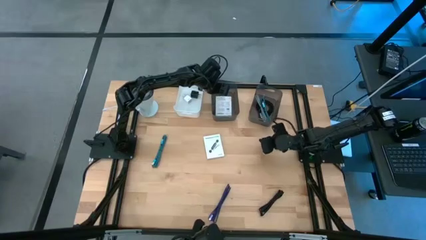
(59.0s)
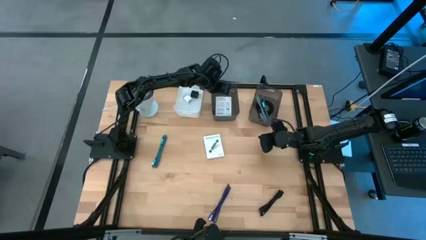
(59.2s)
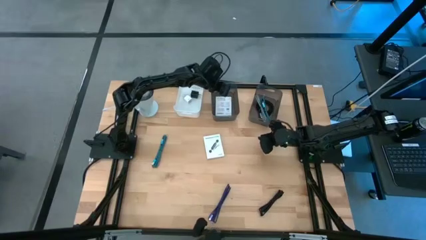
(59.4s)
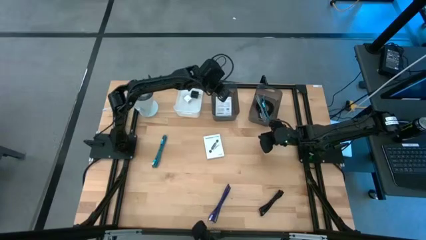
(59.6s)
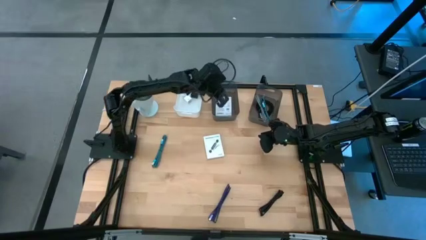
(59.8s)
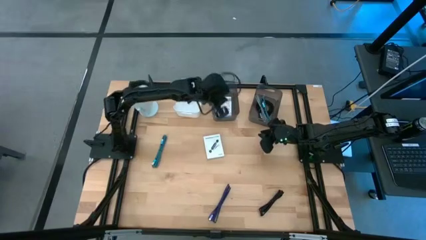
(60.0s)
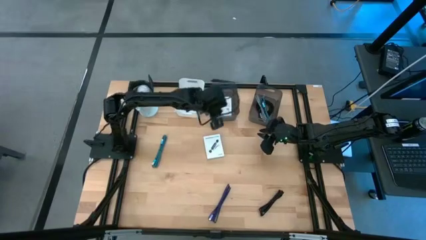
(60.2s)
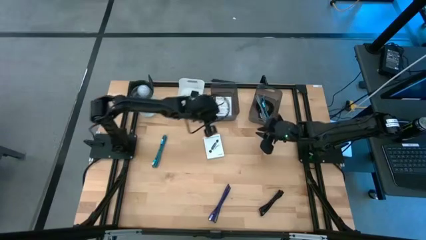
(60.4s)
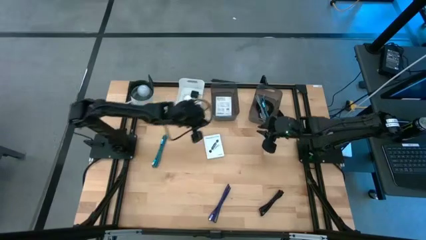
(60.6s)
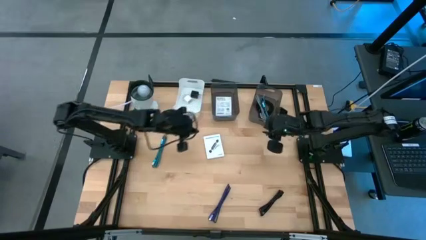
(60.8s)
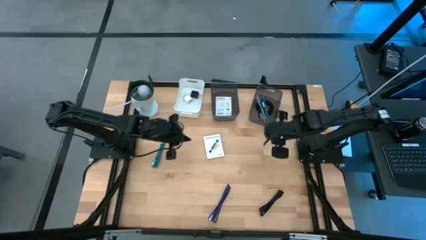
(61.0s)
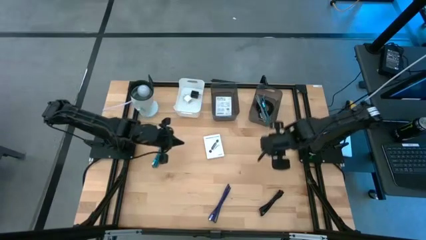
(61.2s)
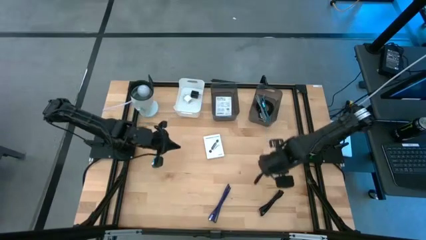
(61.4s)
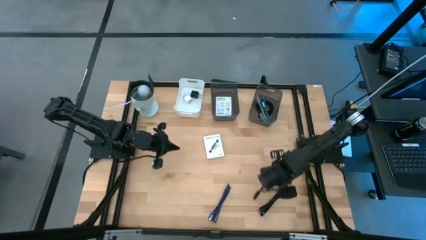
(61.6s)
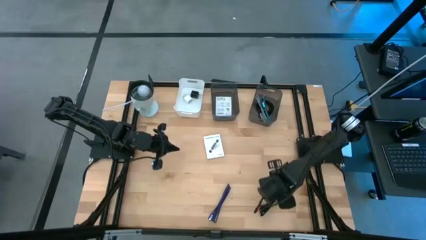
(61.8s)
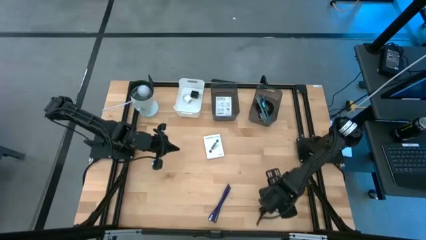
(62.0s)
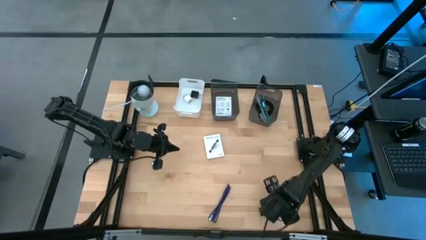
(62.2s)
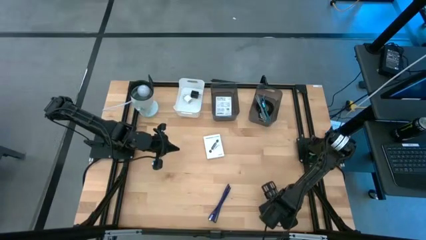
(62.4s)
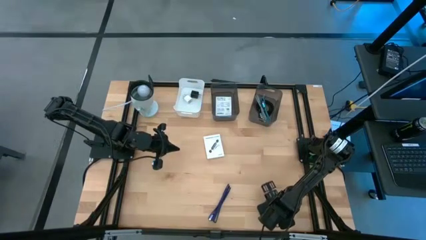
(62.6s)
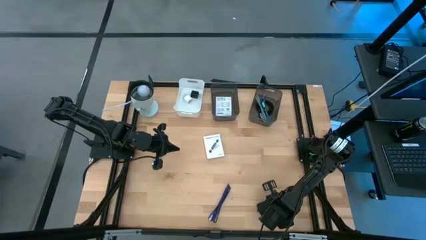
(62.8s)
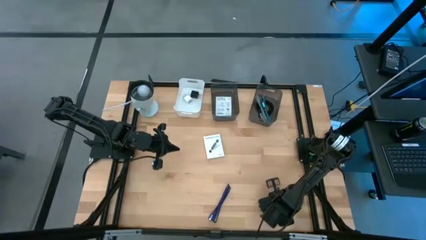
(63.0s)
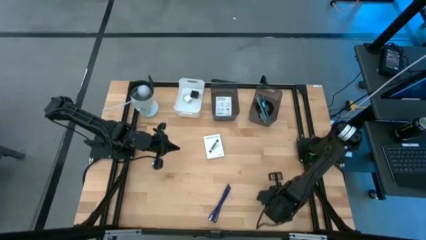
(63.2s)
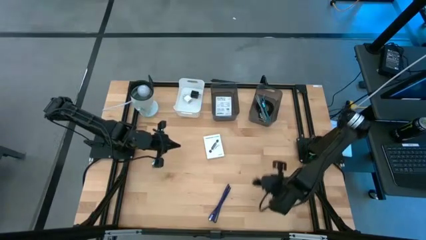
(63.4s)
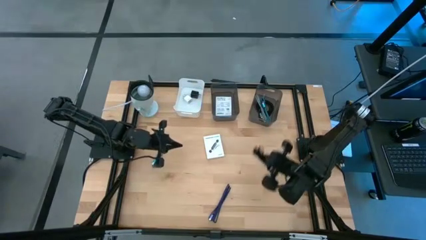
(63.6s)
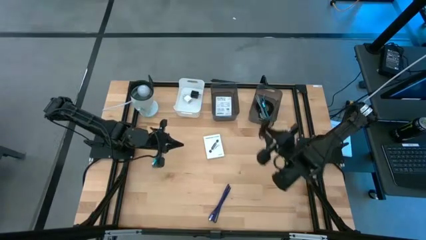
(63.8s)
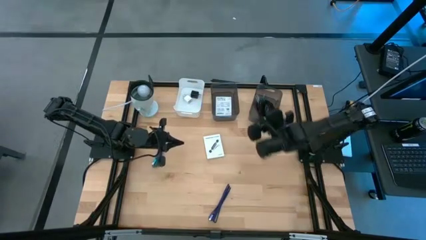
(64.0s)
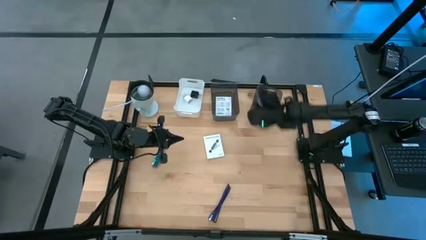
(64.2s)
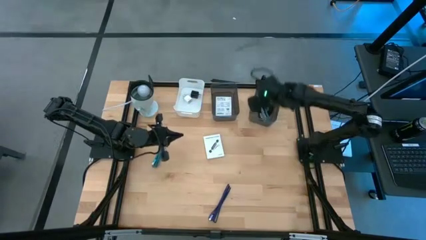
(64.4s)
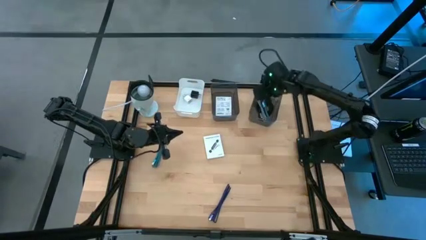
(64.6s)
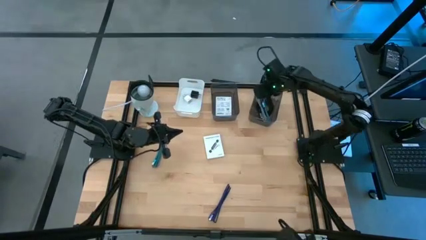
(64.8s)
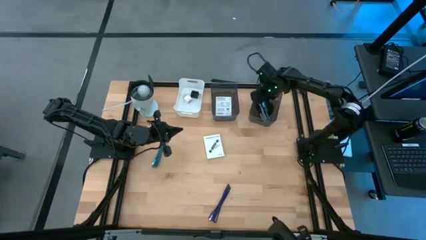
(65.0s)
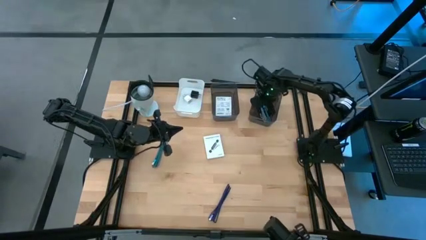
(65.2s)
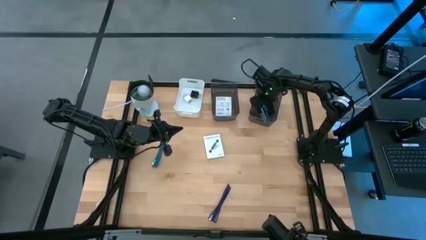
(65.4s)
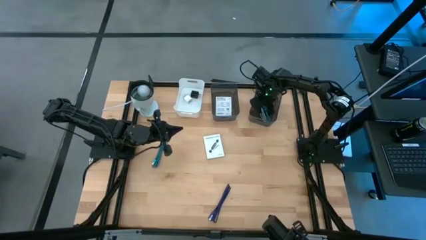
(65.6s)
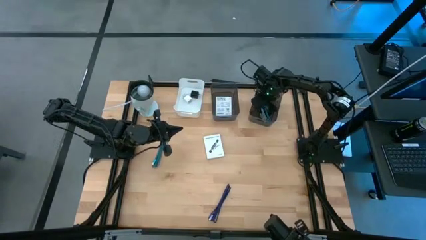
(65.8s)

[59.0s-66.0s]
Task: Pick and place items into bin
Put the black charger cable into the right black bin

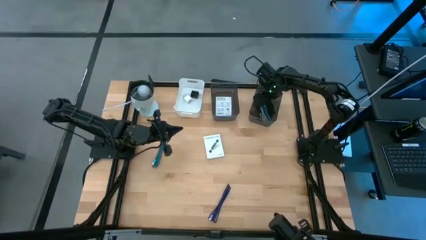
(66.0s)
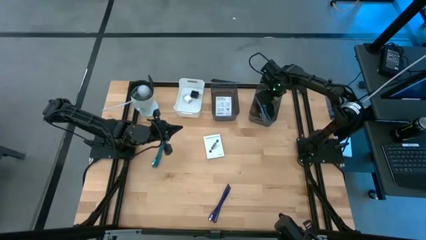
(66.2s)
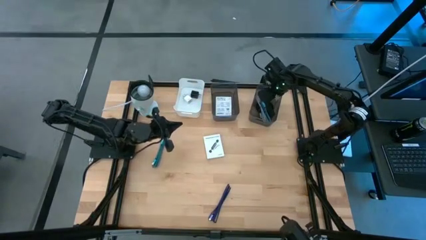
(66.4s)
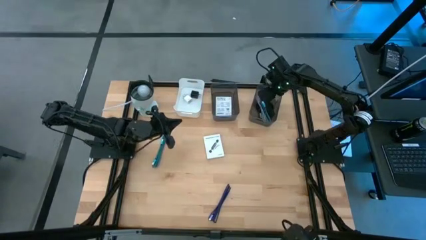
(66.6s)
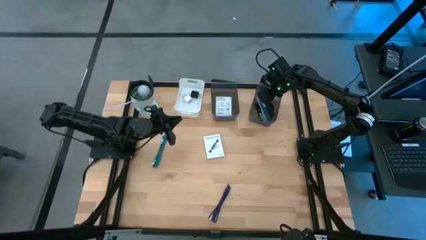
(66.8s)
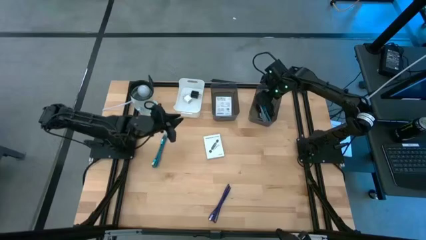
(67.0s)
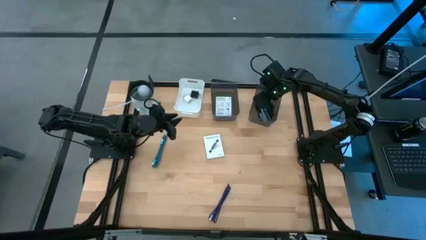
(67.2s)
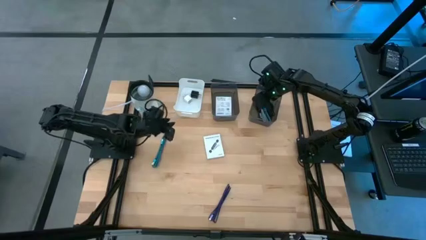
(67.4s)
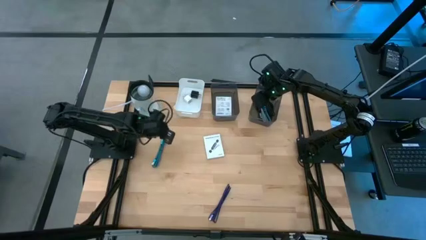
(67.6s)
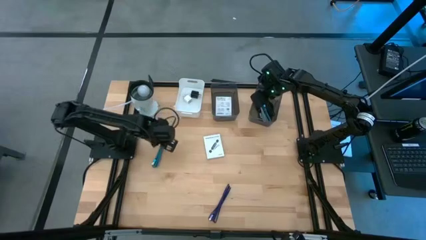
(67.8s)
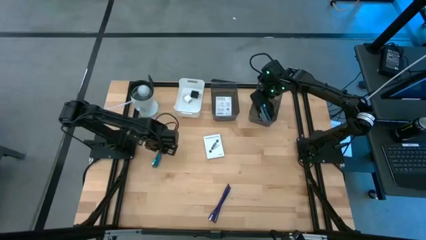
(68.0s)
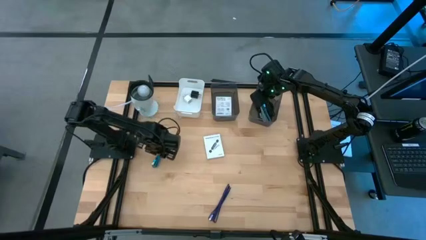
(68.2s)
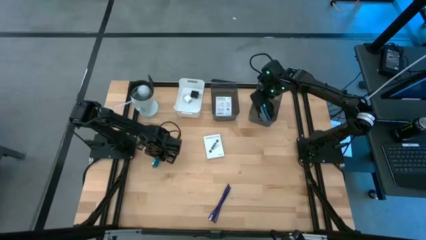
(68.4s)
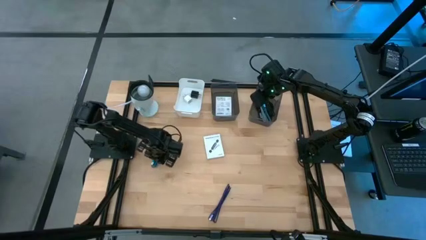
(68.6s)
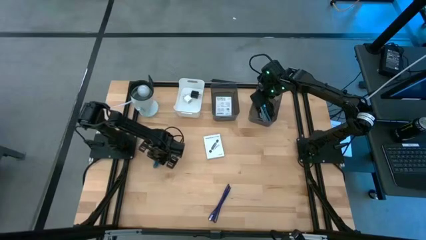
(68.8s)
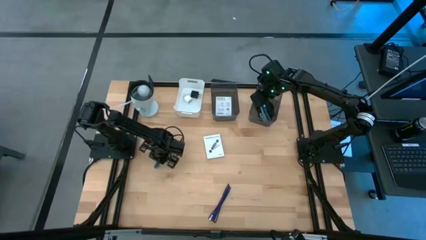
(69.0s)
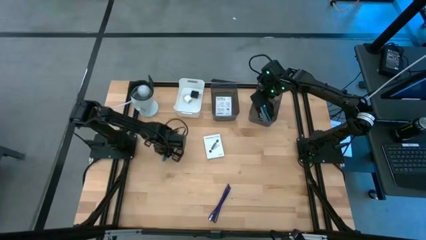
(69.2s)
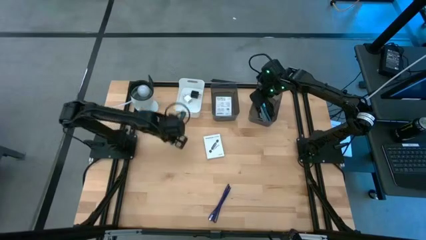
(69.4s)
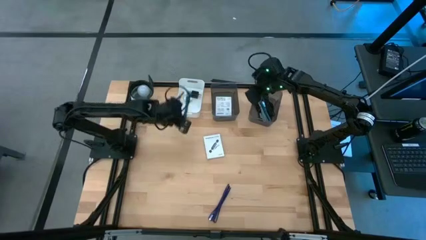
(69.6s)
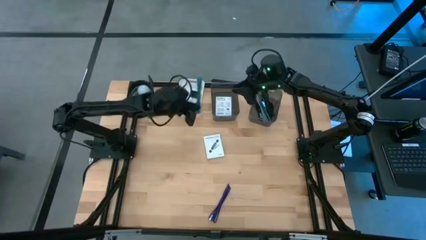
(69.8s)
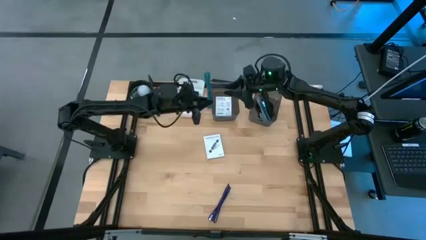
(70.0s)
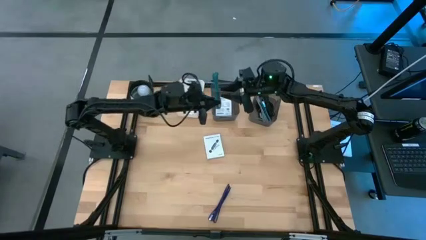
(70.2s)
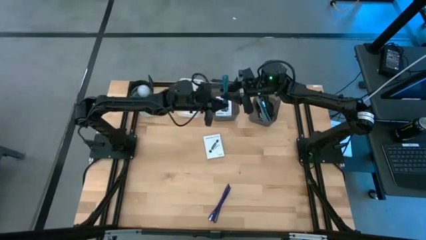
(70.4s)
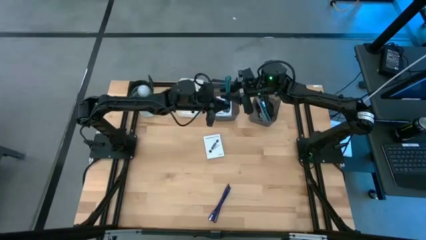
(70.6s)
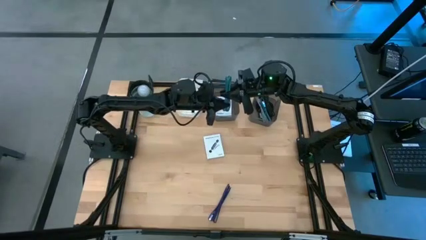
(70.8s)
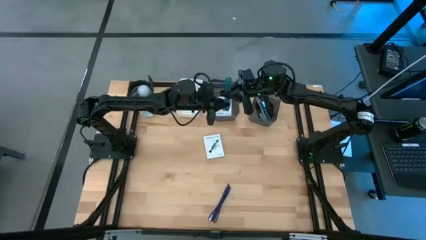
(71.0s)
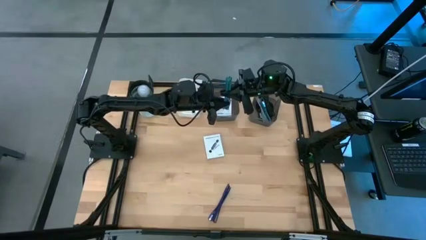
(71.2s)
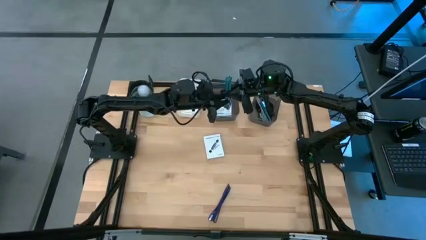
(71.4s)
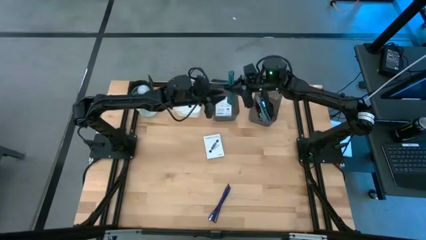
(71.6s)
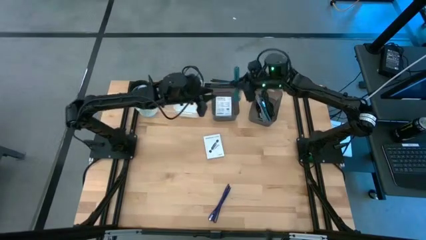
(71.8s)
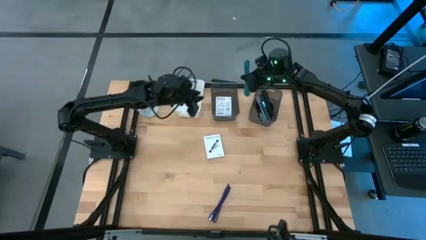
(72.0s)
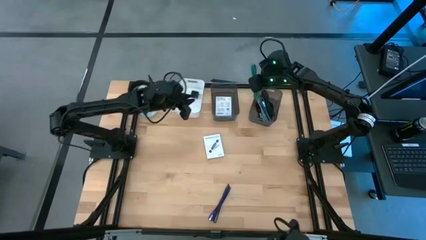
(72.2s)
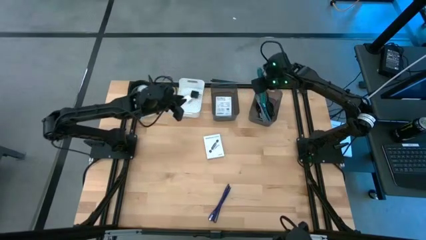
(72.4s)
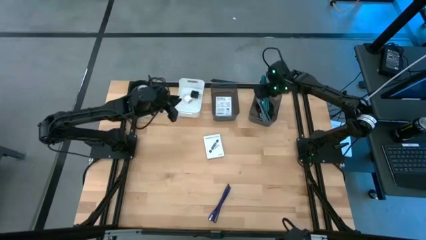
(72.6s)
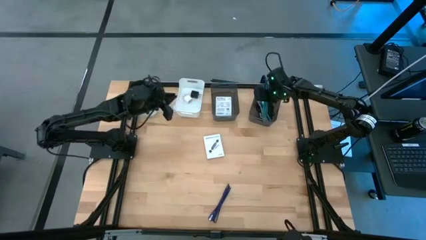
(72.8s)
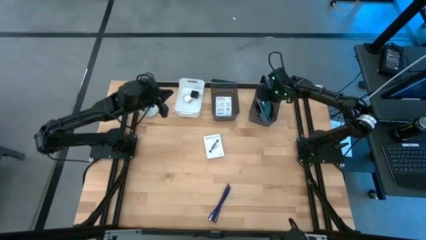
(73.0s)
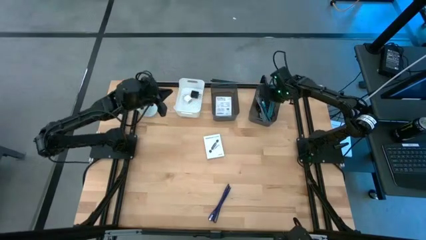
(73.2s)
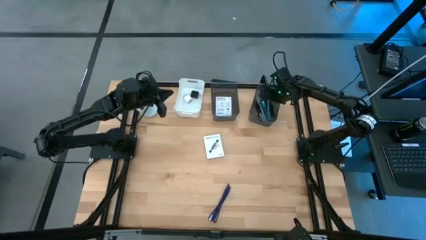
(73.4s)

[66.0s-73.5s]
Put the blue charger cable into the right black bin

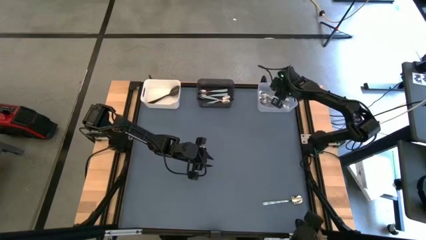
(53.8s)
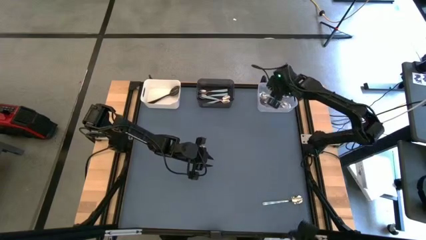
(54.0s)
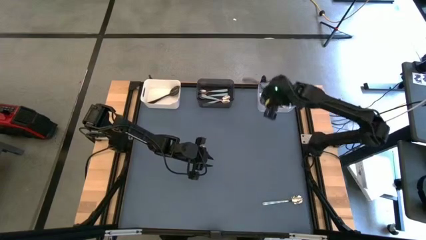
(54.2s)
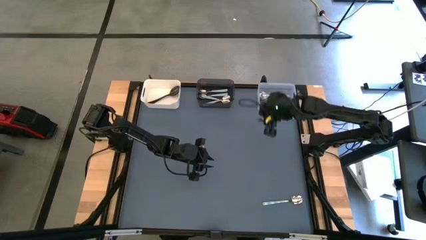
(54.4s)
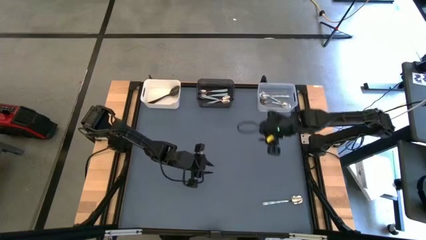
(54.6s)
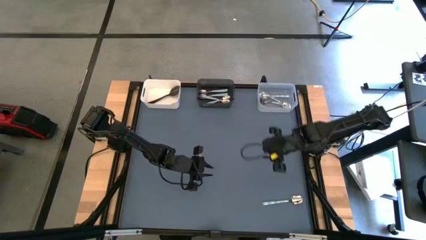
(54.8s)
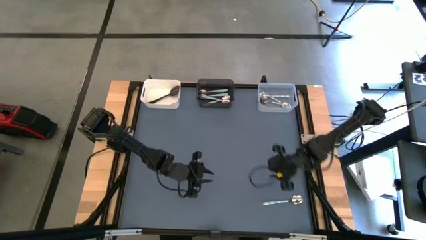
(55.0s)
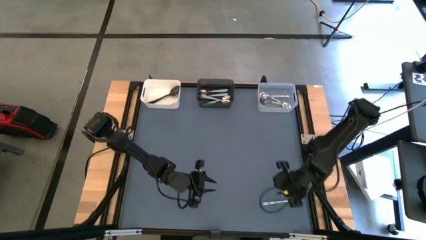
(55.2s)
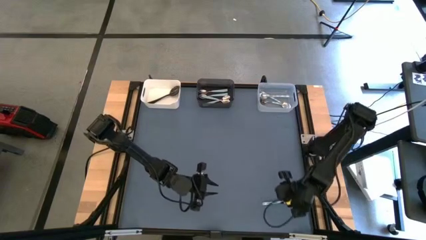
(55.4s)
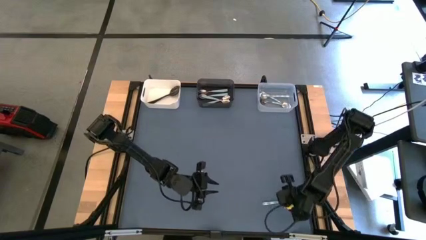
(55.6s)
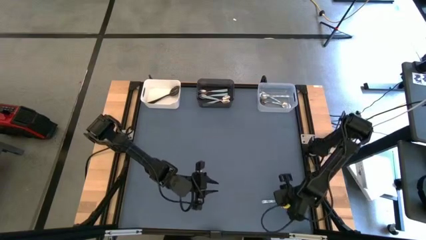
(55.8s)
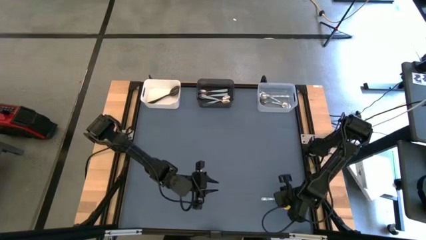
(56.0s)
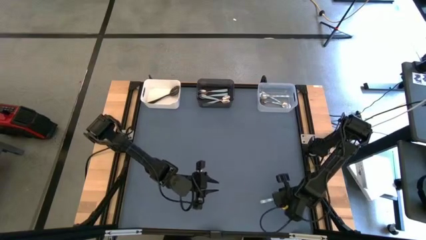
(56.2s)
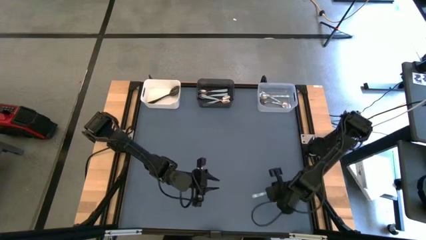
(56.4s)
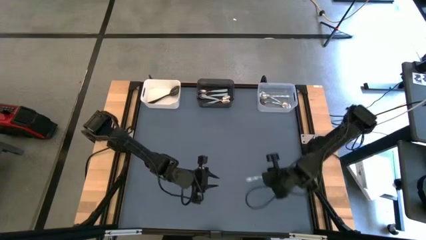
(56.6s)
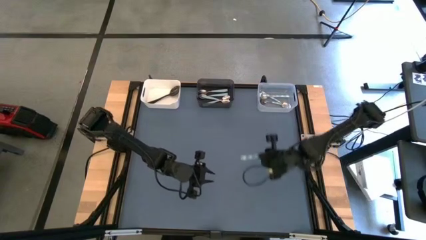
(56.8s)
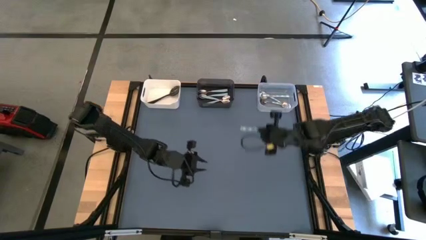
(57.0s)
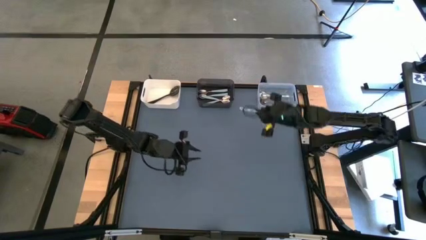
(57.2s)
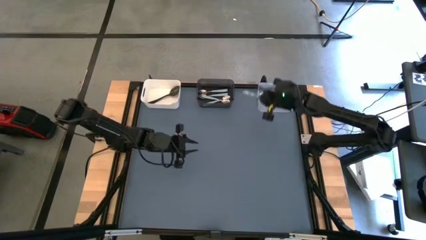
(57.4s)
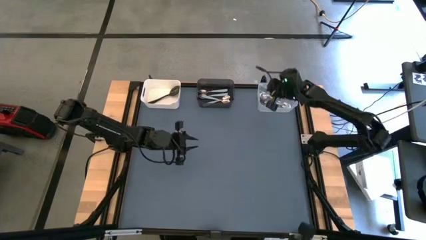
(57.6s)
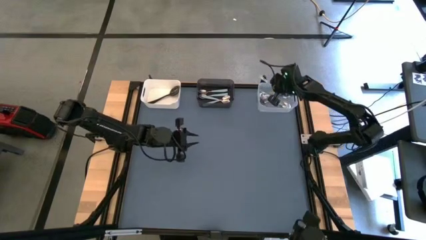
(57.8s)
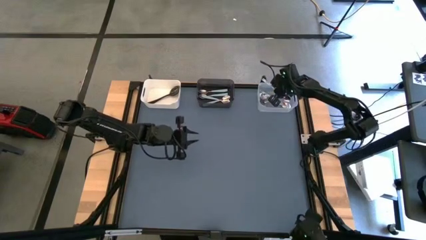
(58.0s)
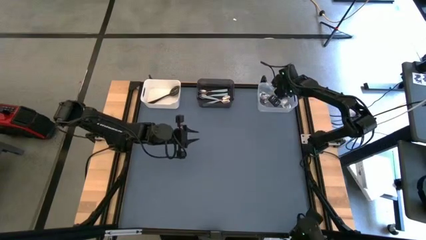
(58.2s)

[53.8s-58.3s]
Task: Sort silverware by color (type)
Put the white and blue patterned spoon into the transparent bin
